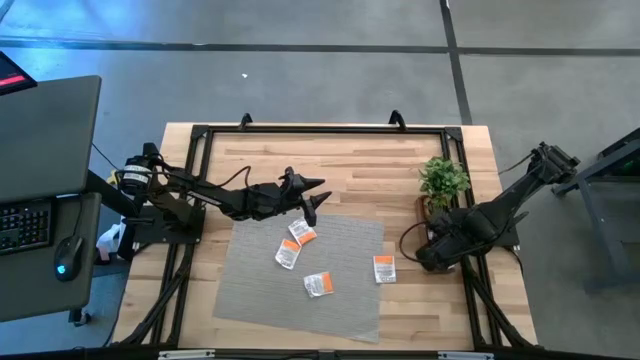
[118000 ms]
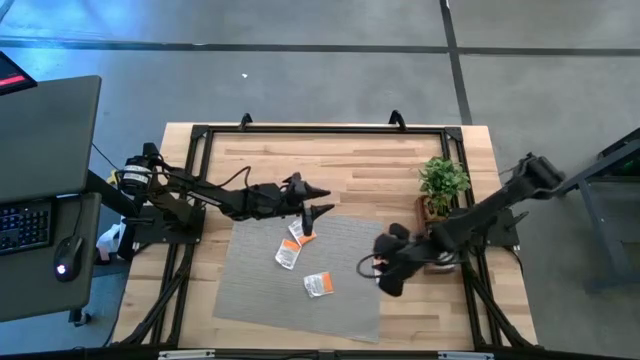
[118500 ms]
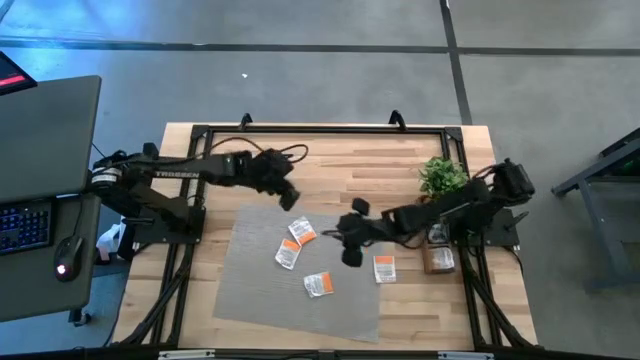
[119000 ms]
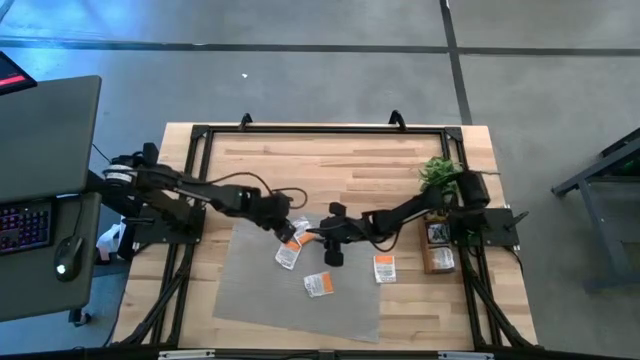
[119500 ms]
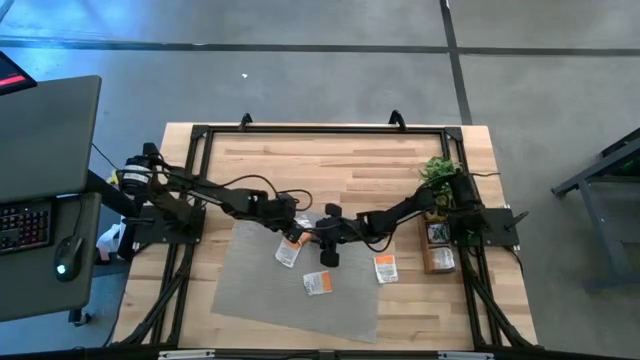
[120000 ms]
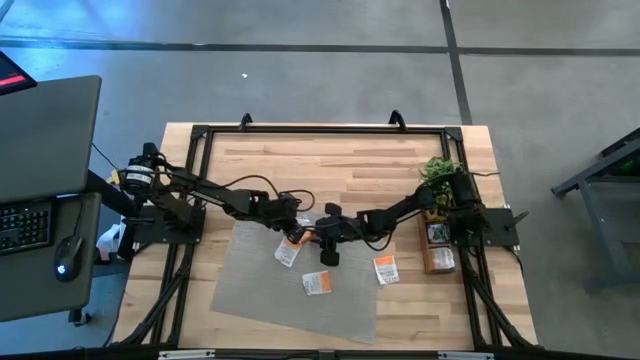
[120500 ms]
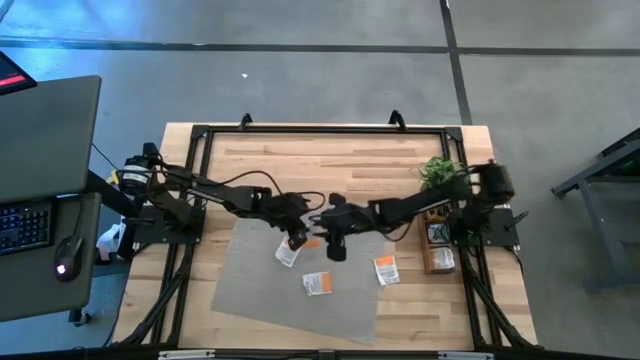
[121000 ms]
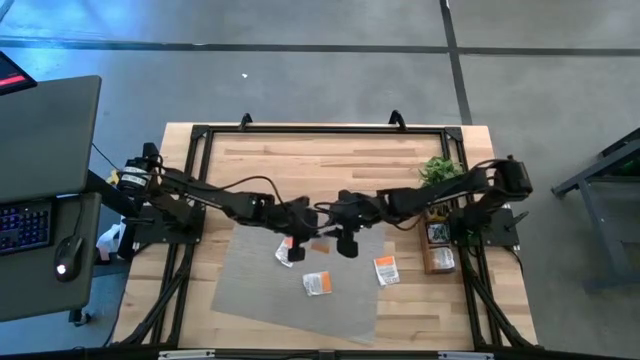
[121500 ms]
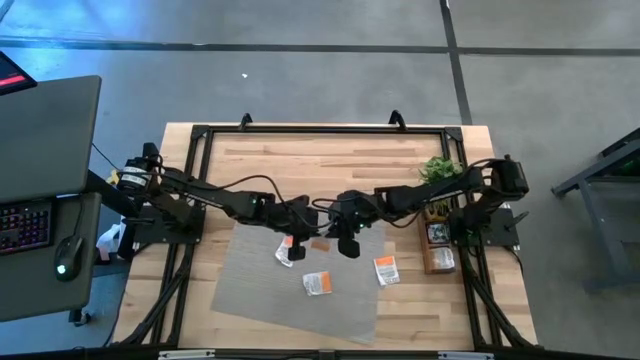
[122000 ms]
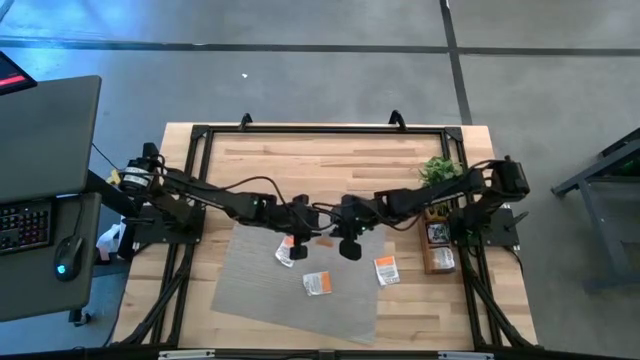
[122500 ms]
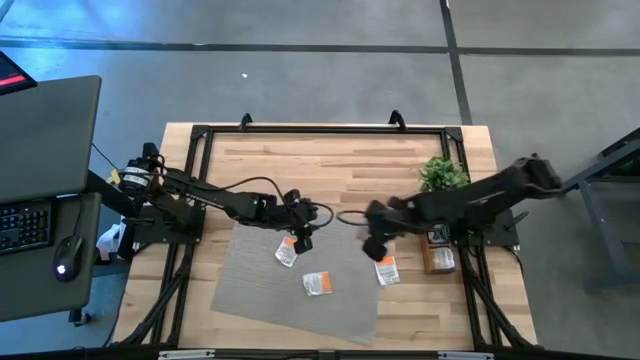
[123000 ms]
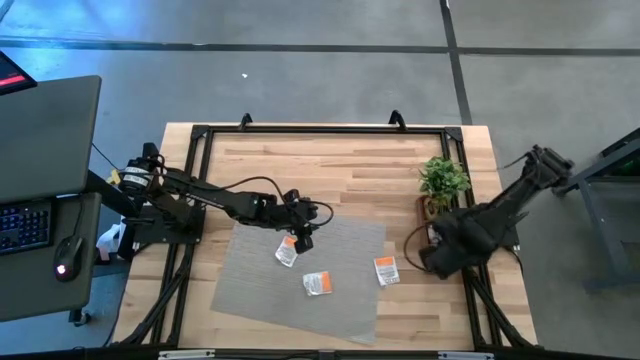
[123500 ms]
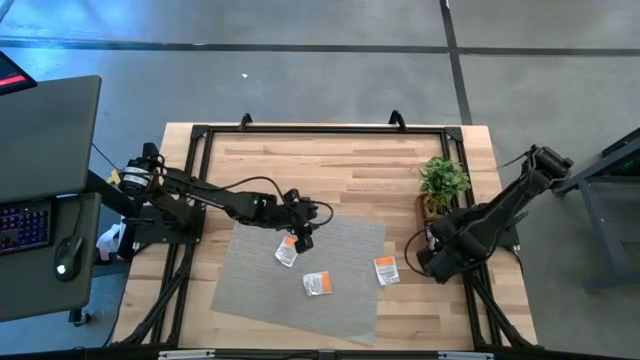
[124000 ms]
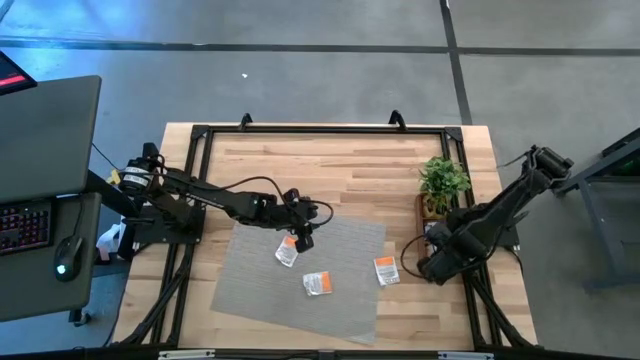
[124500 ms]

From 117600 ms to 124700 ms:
Task: Pick & Place Tea
Put the white tea bag into the bottom section of the wooden organizer

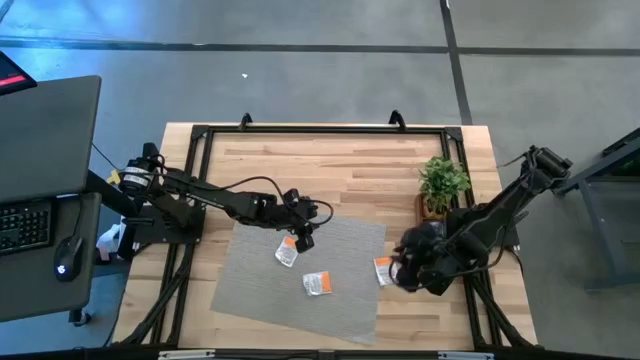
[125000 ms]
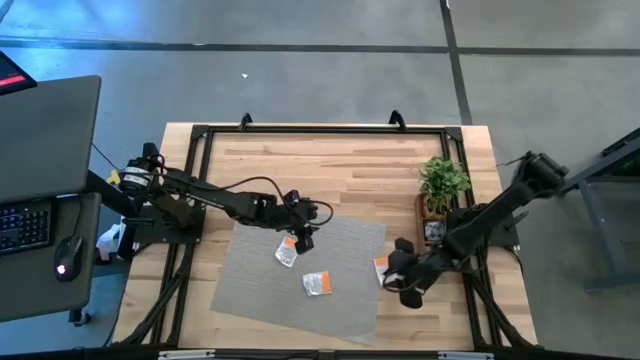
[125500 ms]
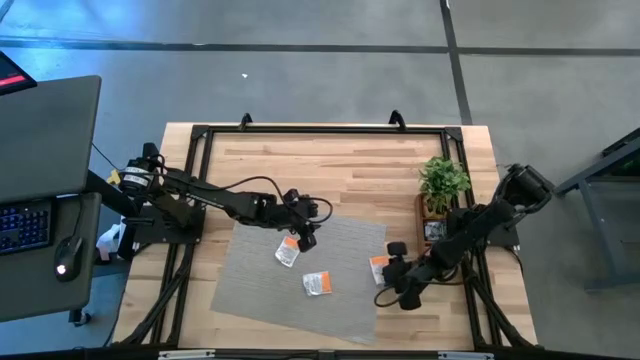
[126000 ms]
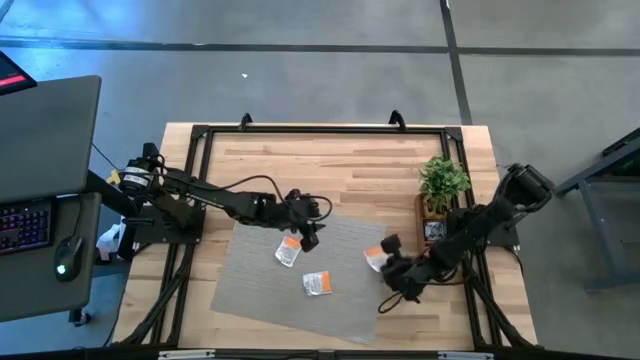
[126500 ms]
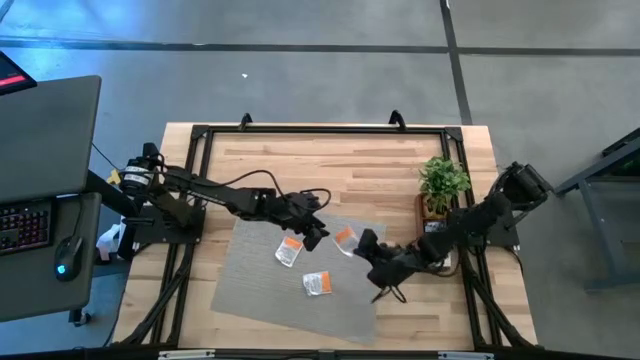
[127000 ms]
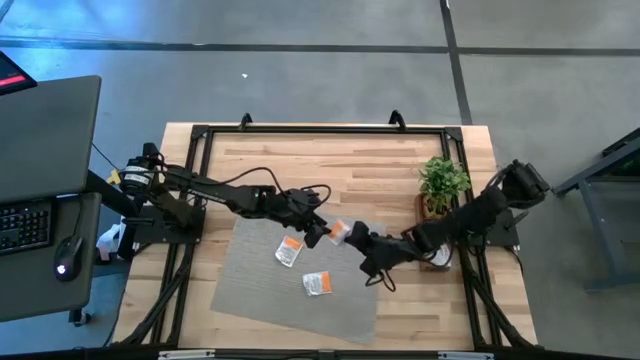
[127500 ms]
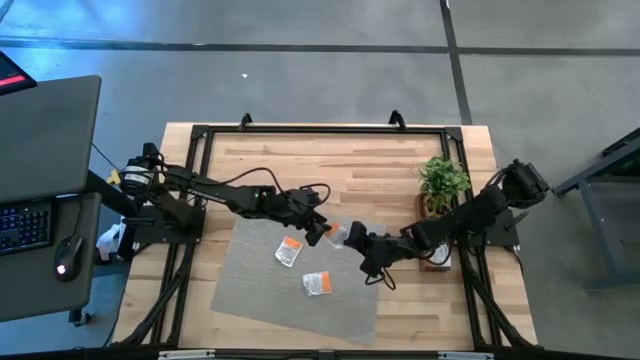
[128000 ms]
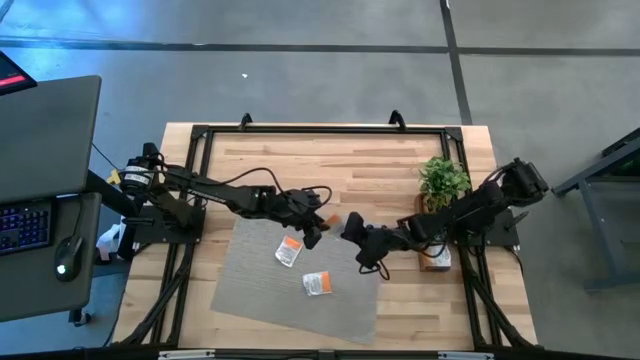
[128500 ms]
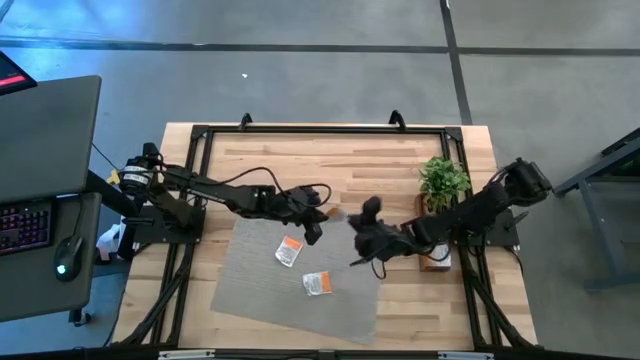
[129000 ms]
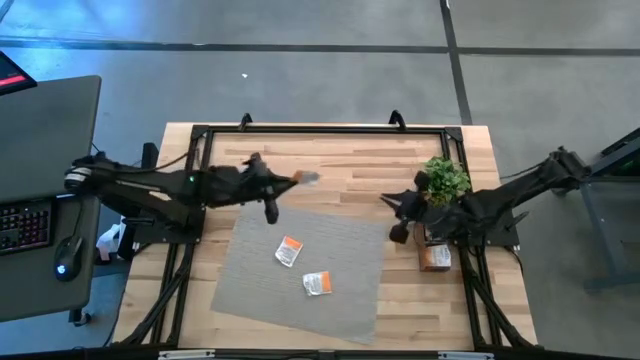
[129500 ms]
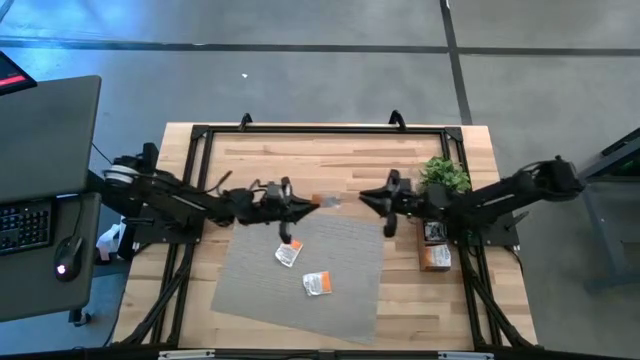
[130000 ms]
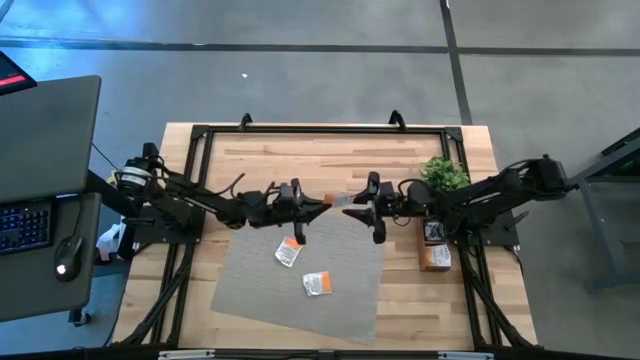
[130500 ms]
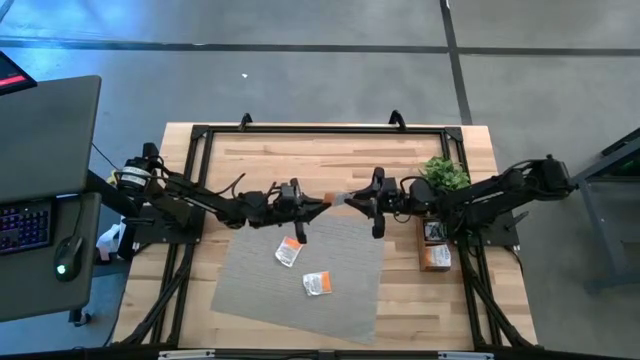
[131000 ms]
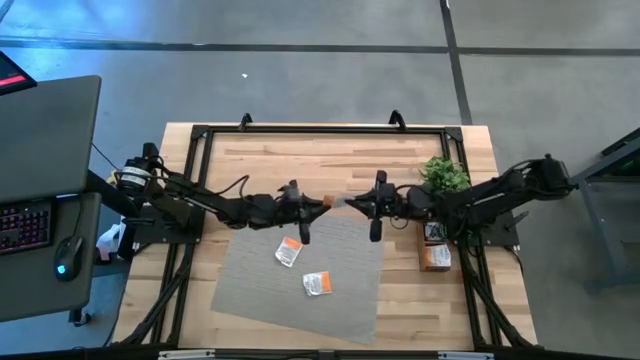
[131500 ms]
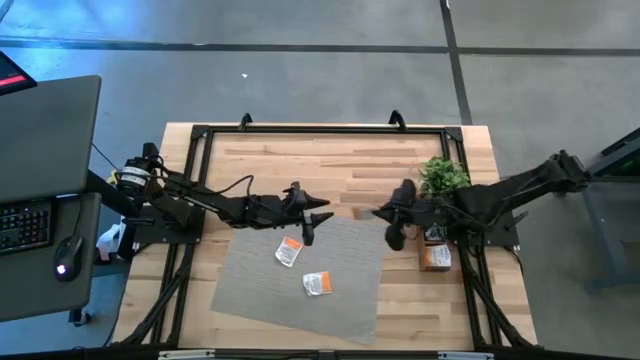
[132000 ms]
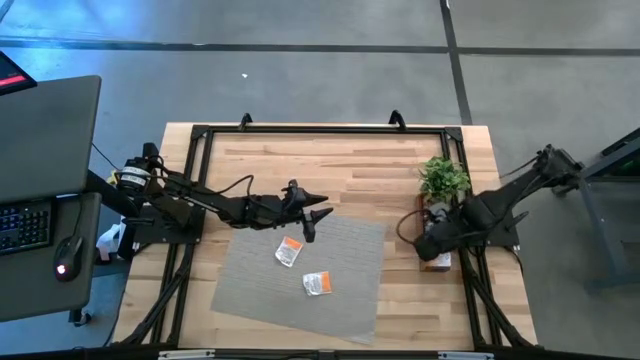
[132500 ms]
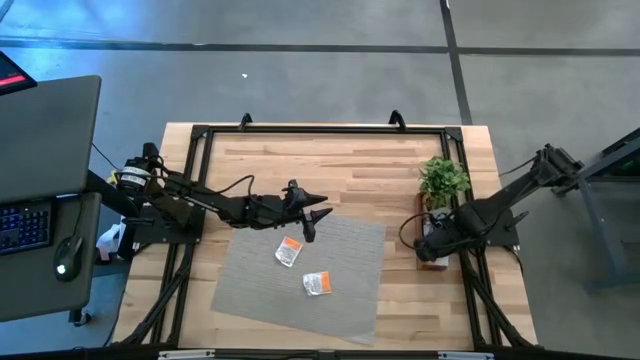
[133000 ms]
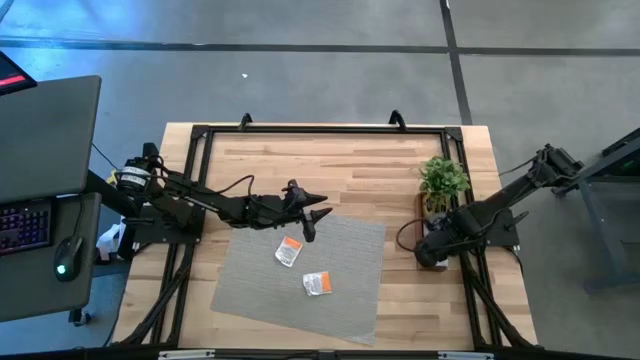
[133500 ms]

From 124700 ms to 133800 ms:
Put the white tea bag into the bottom section of the wooden organizer

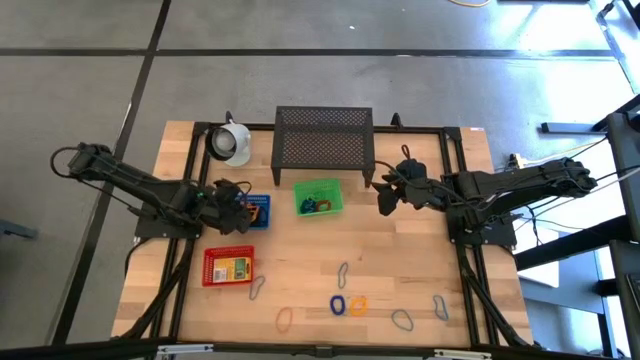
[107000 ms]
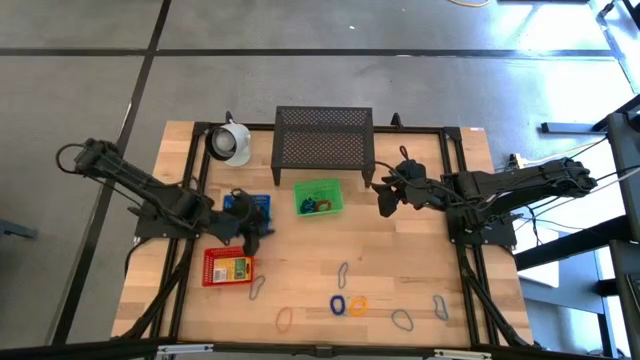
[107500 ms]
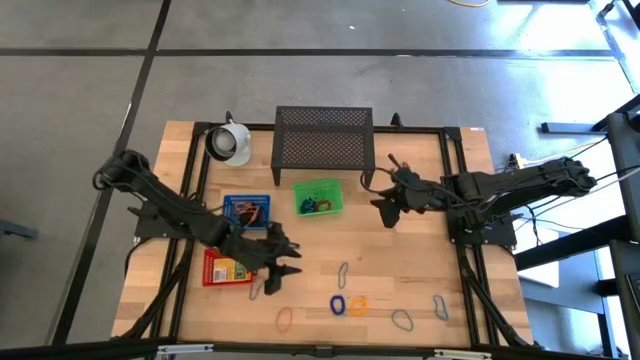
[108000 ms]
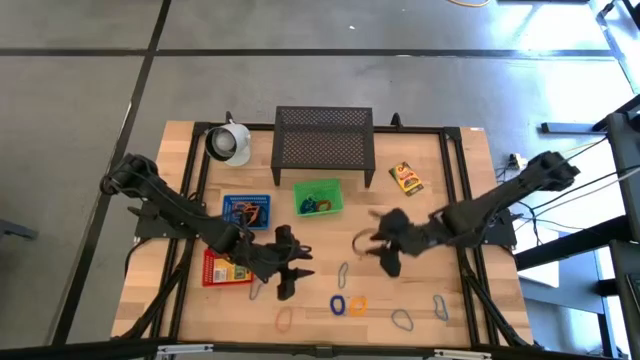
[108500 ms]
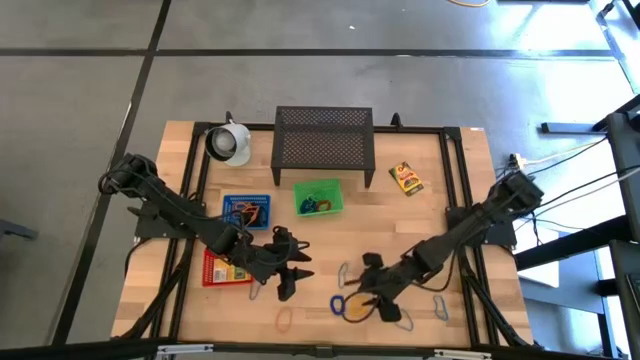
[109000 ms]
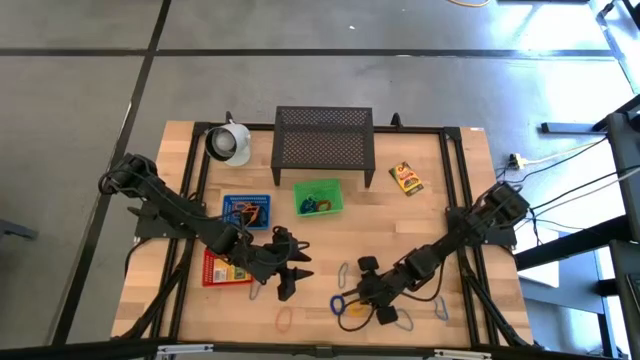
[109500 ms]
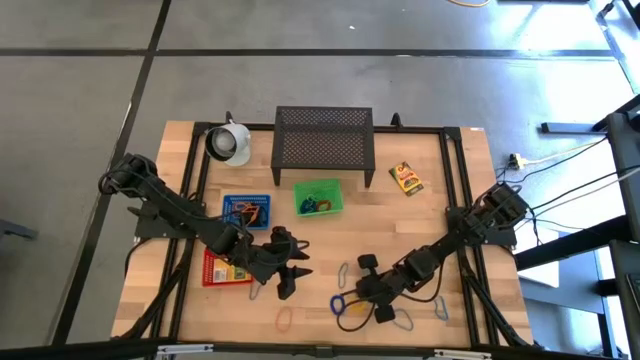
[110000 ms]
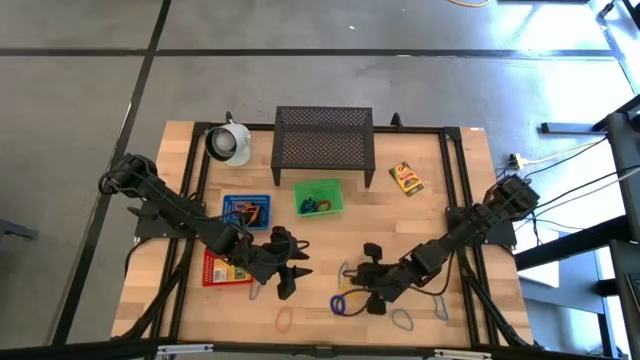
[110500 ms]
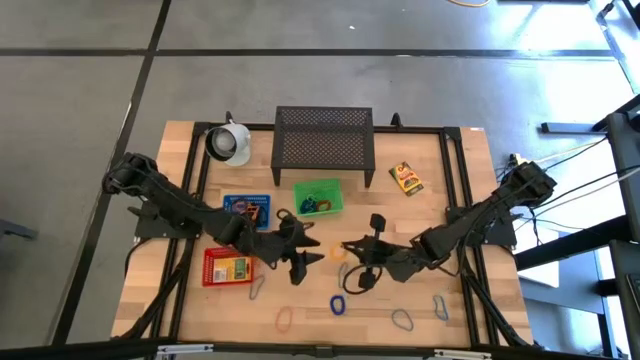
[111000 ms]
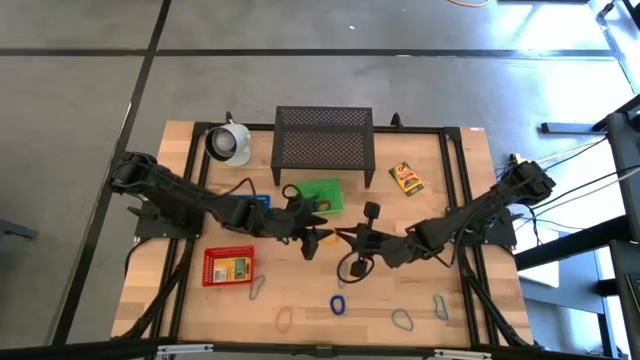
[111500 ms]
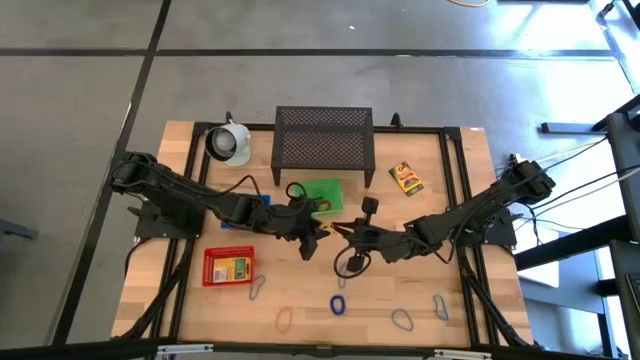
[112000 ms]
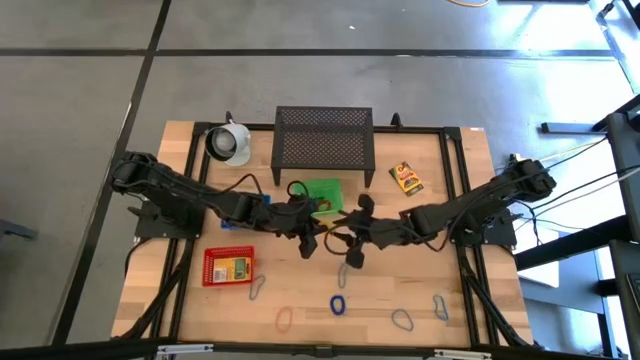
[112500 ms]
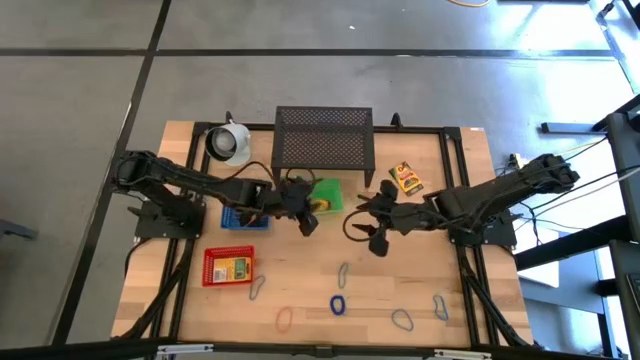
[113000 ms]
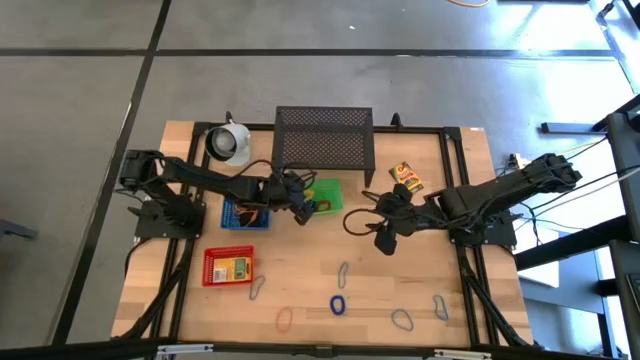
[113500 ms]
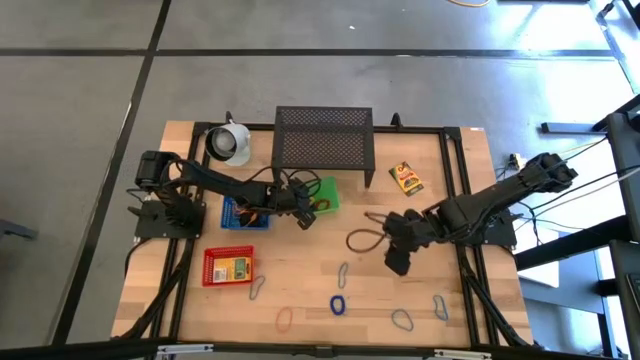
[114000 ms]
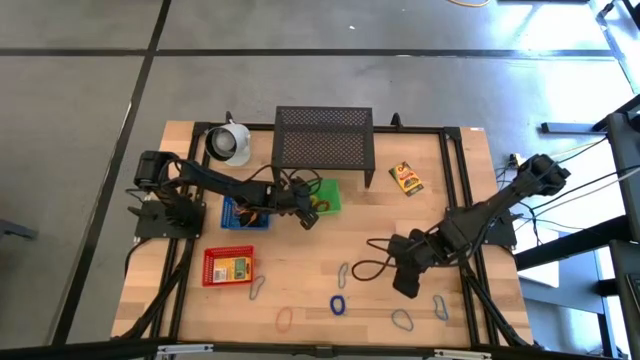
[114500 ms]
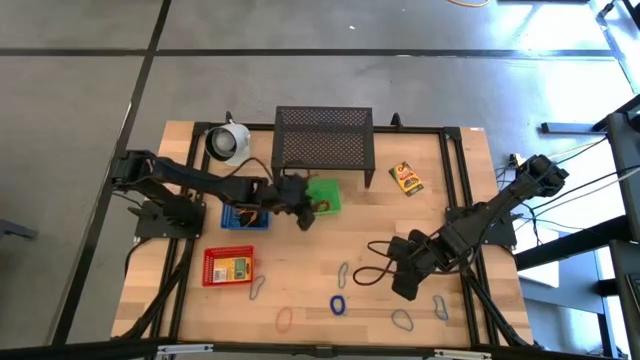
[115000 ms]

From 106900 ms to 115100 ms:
Task: Pick & Place Office Desk Supplies
Put the yellow spring keychain into the green bin
